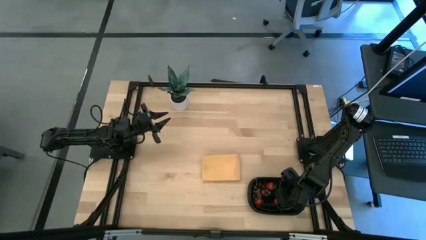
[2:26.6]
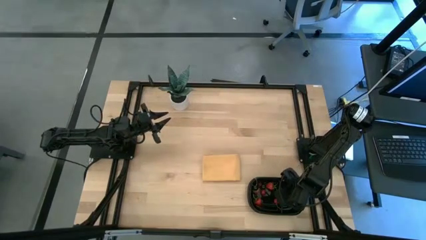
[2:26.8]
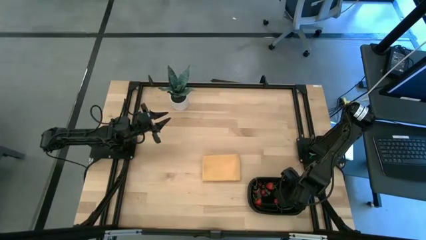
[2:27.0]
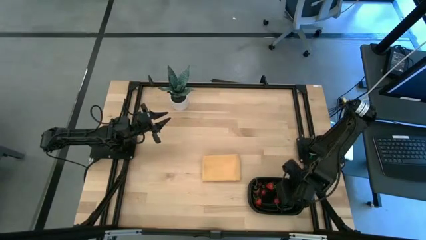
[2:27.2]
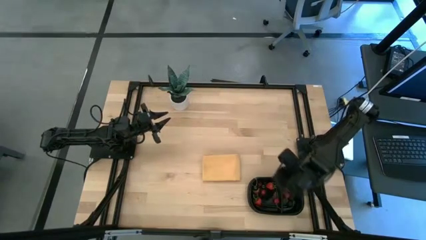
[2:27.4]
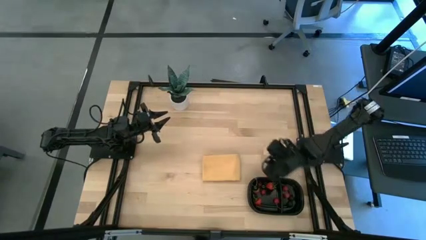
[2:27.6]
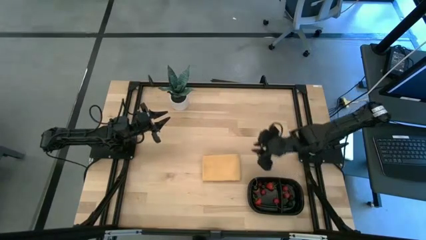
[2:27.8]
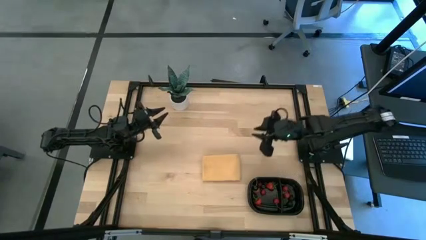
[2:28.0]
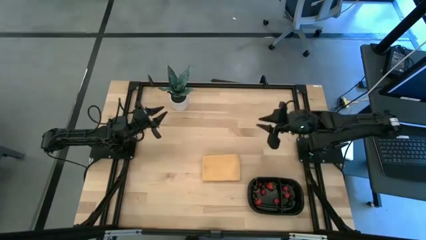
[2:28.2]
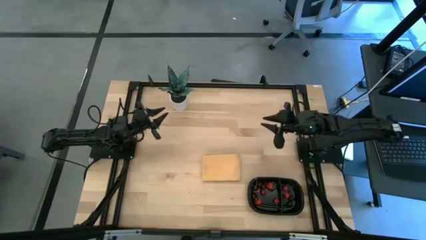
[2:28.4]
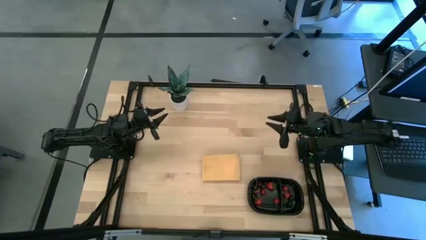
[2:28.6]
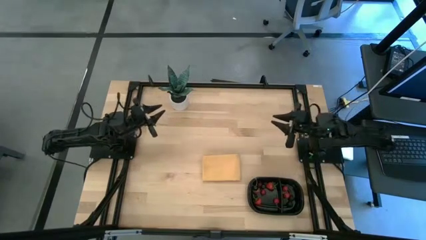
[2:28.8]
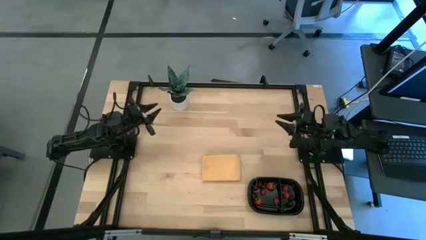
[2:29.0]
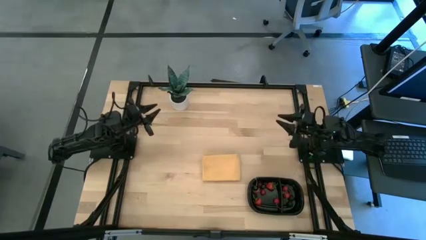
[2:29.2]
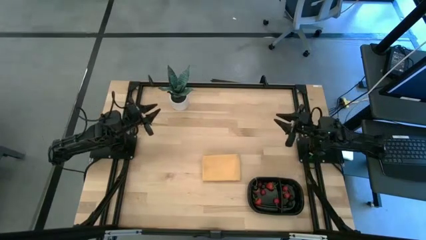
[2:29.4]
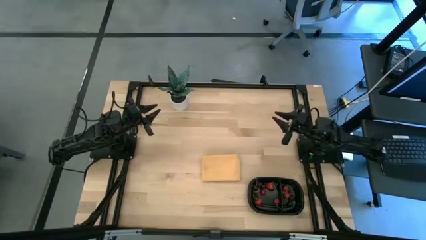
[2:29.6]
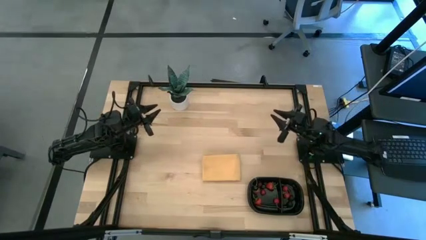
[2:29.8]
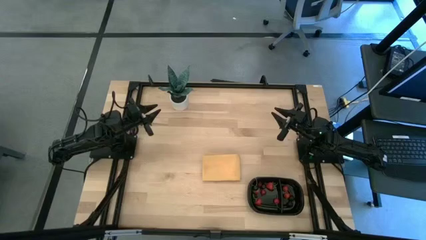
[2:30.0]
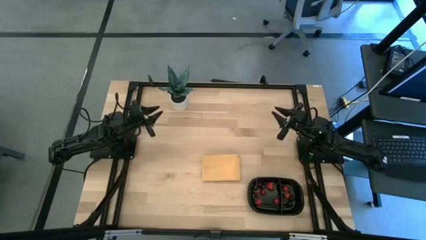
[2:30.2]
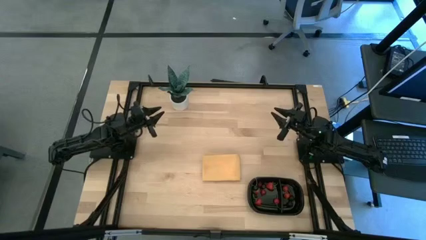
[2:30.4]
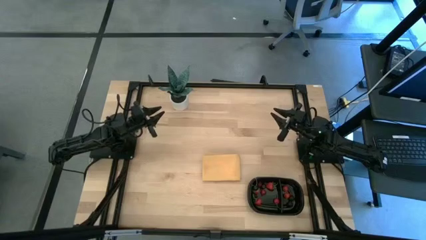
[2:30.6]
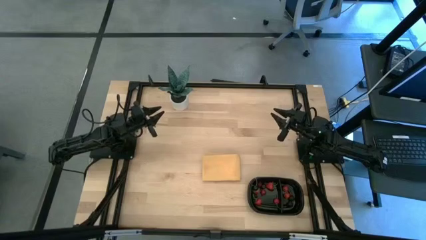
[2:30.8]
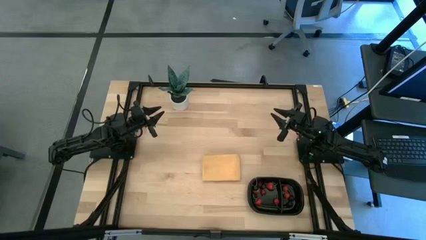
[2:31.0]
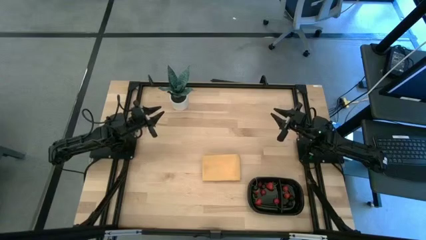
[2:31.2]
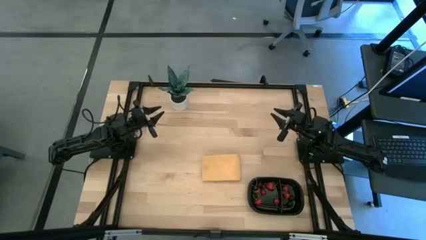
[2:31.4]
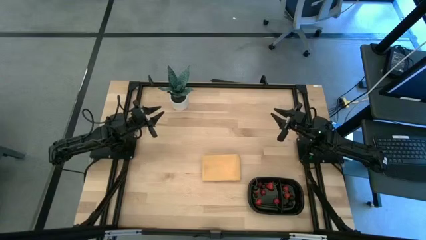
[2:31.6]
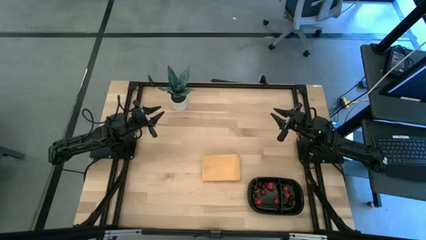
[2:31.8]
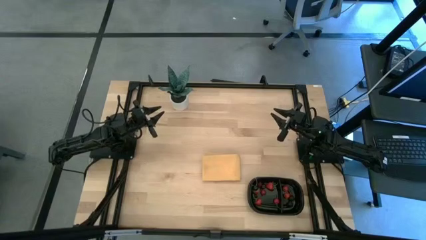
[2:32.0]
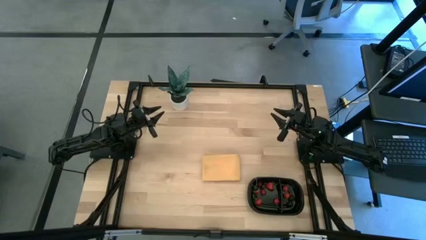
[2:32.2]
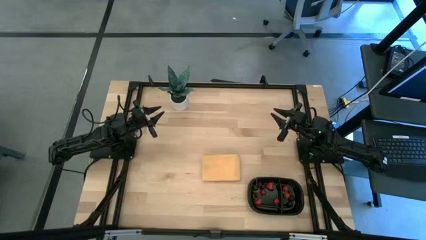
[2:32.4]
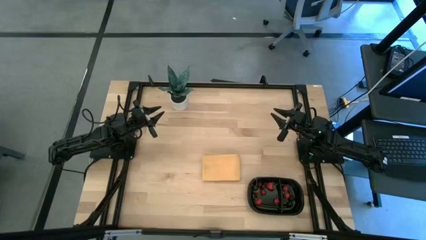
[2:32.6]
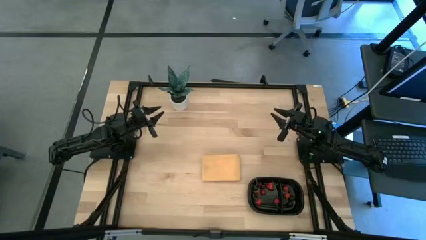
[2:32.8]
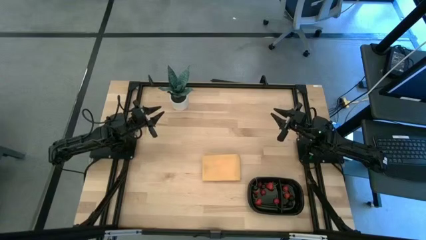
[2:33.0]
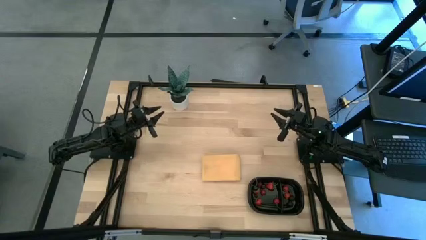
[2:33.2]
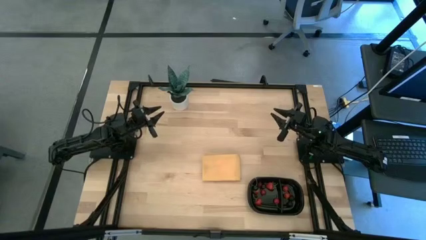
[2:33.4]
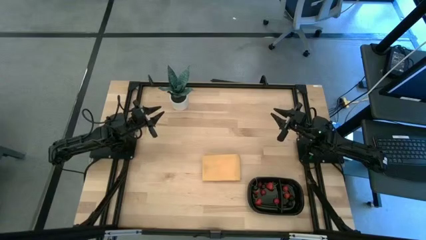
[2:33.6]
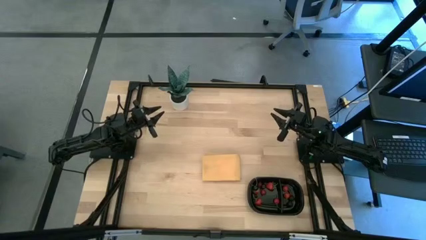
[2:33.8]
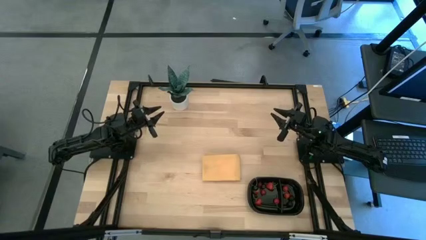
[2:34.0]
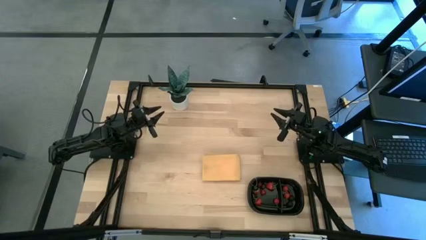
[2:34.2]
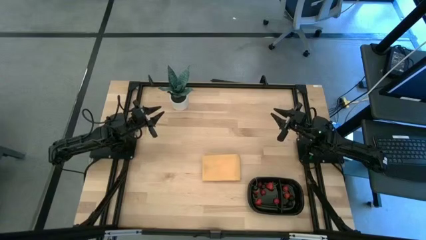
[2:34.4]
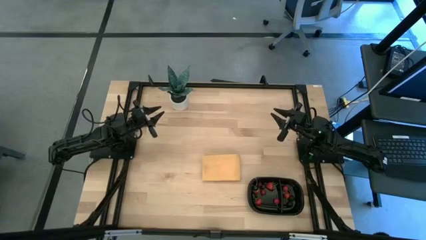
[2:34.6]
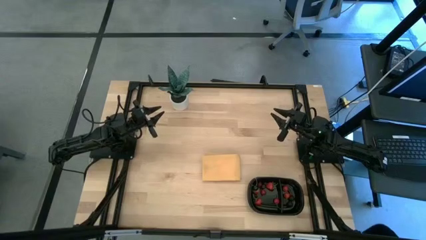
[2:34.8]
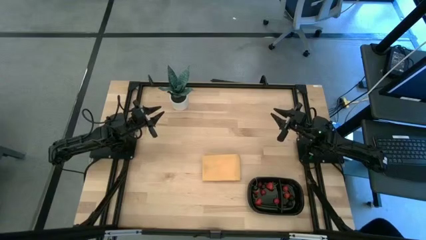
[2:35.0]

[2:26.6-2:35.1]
Task: Pick and placing Produce into tupperware
Return to Home Position
